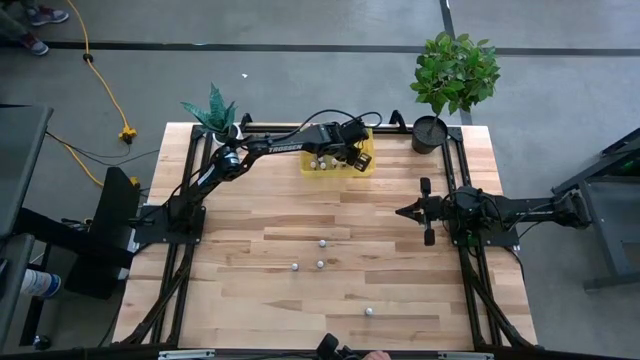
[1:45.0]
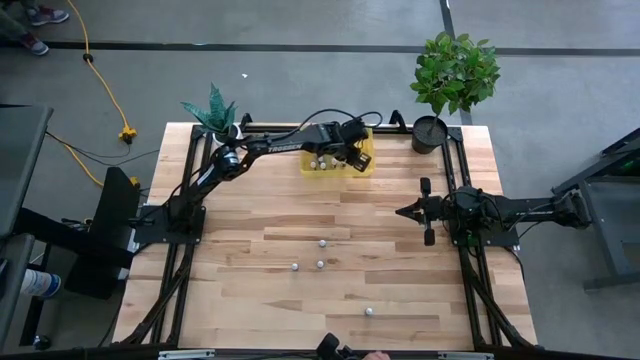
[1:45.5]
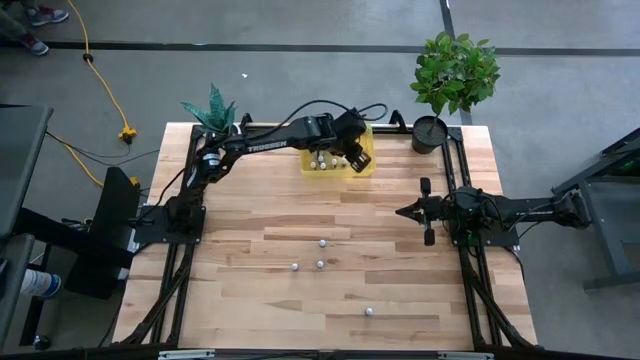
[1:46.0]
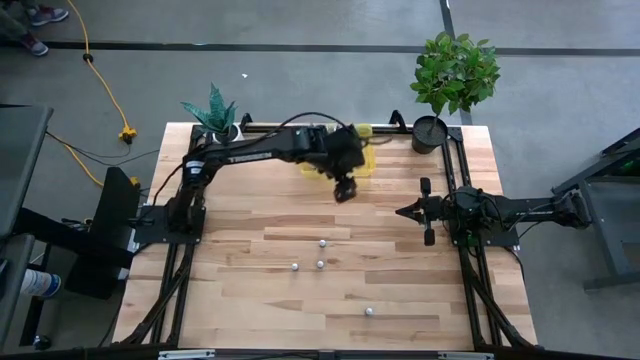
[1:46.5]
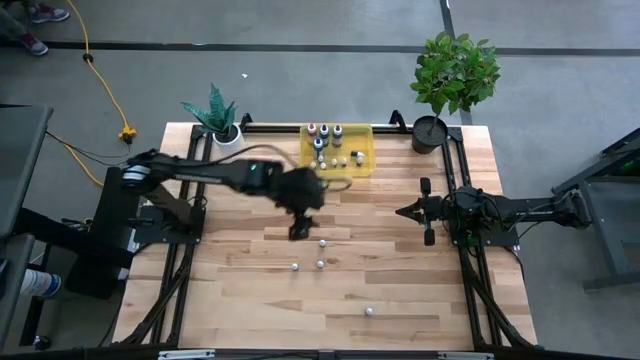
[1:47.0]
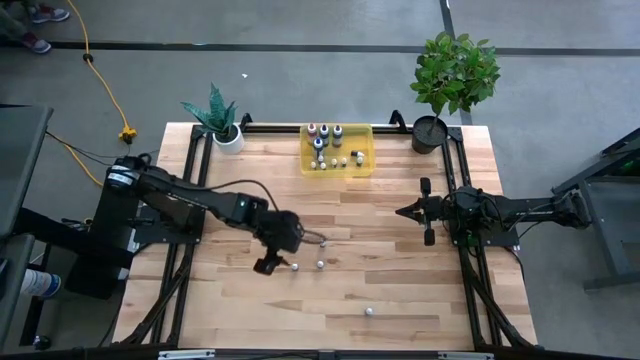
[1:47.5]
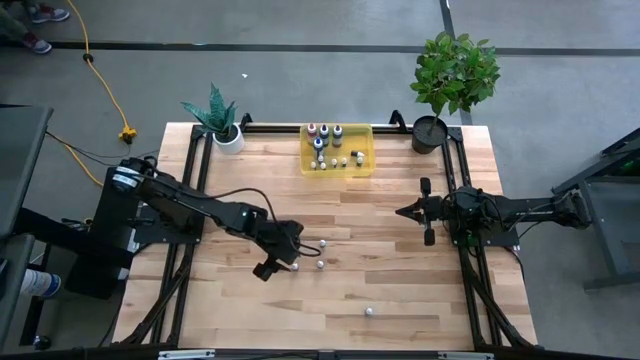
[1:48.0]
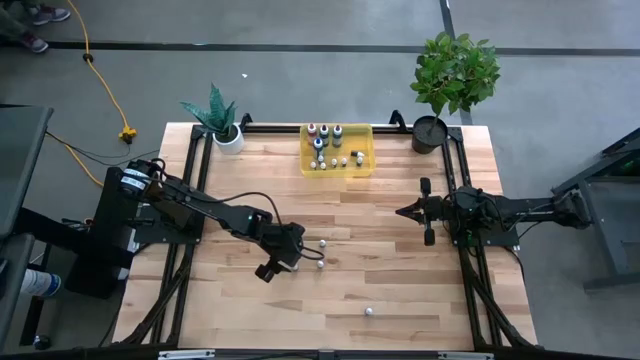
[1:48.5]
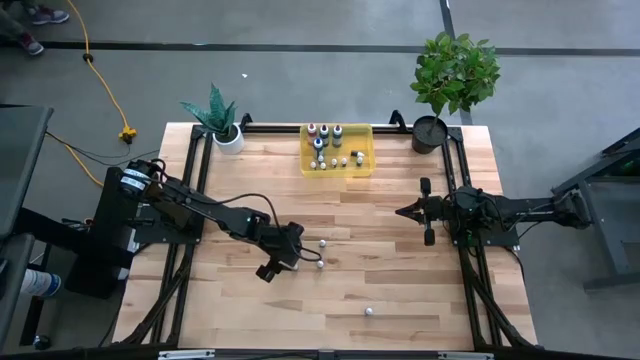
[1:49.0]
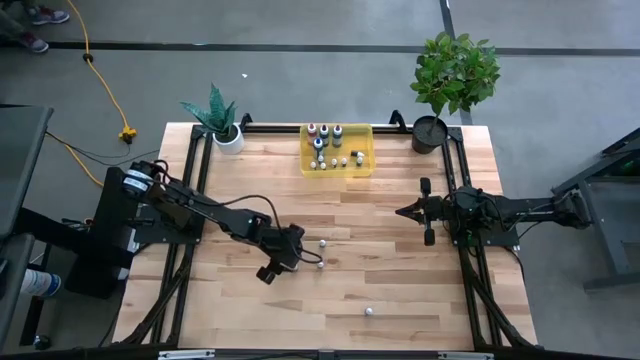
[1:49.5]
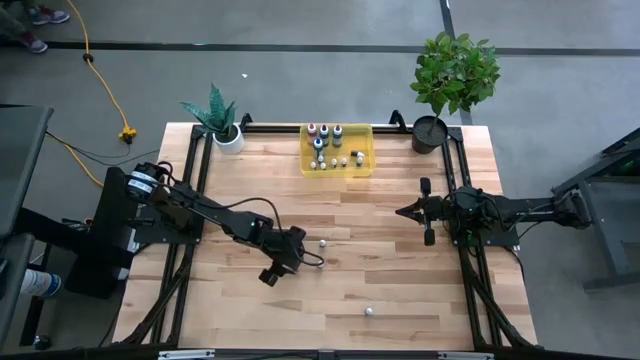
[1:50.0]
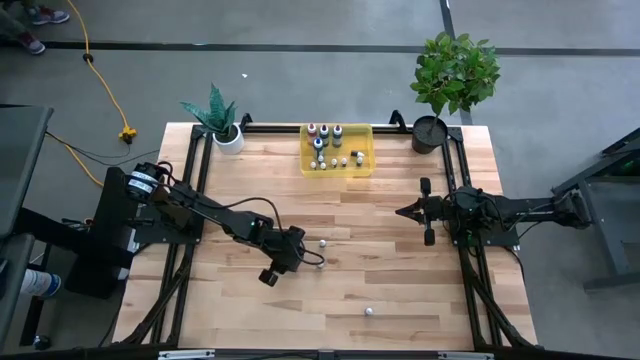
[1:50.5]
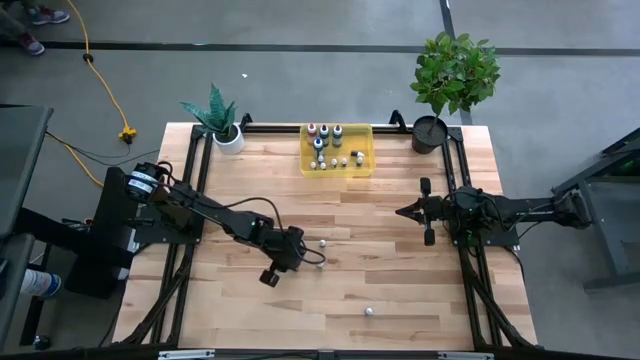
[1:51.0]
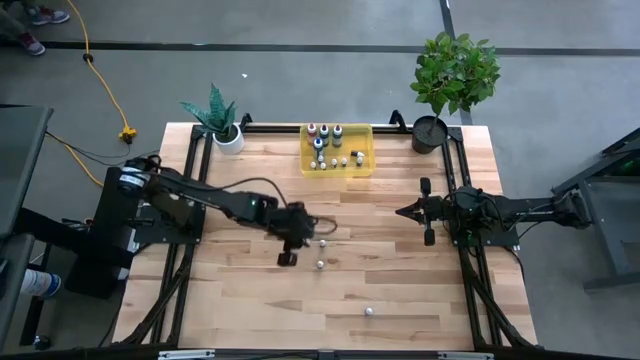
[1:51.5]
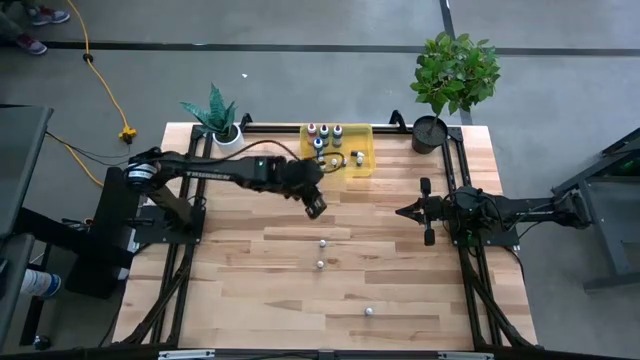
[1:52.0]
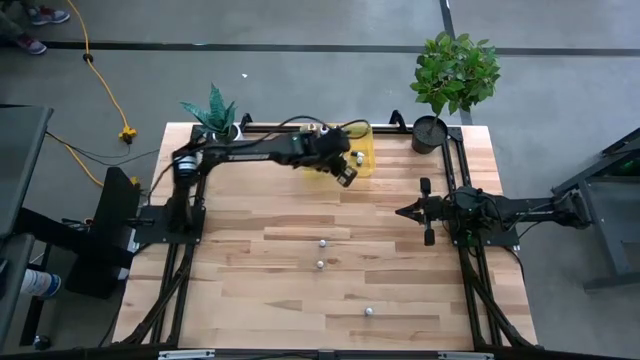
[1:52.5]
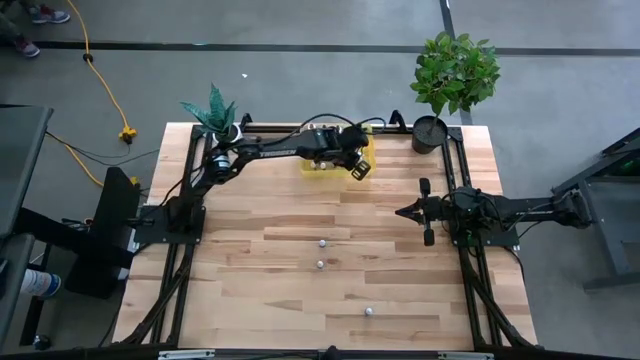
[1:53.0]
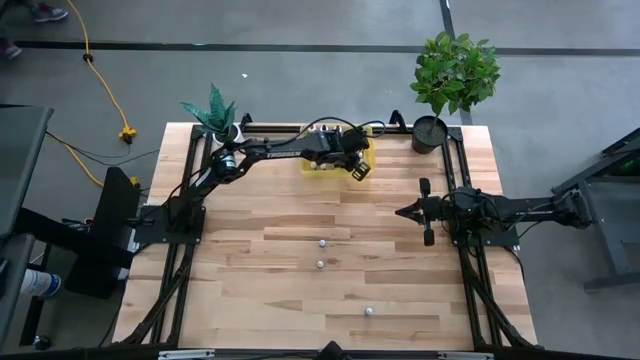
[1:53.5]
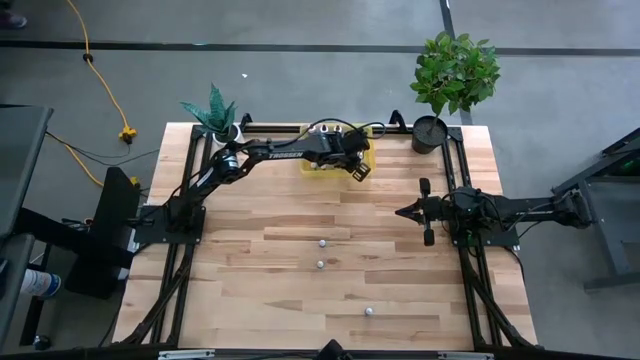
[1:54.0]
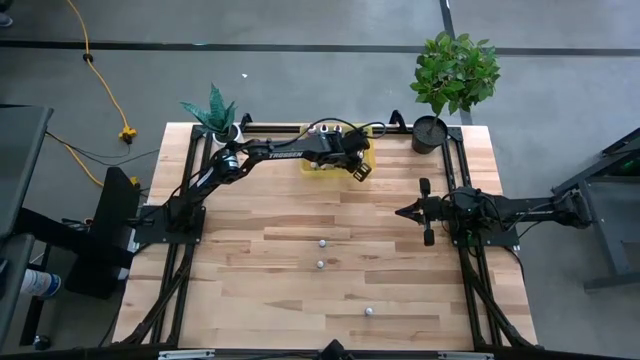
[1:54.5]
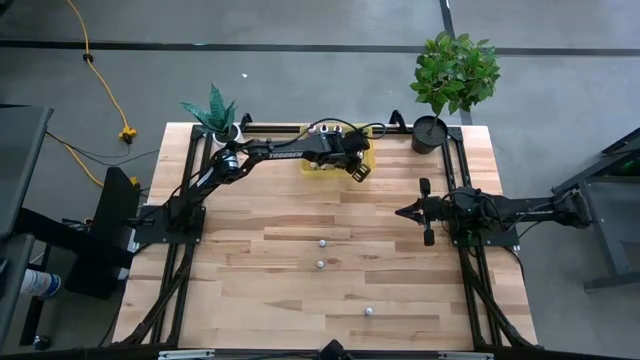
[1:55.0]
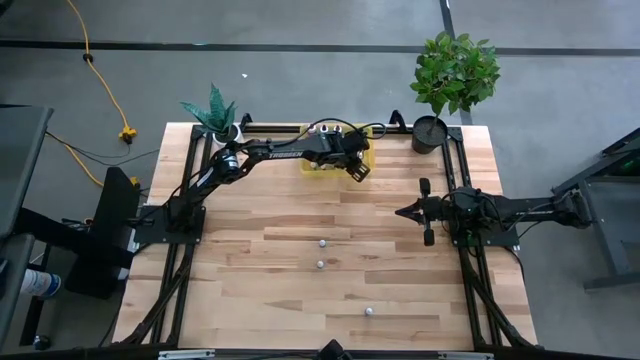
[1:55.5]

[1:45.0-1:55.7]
Task: Pick & Place food coloring
Put the small red food coloring bottle into the yellow bin

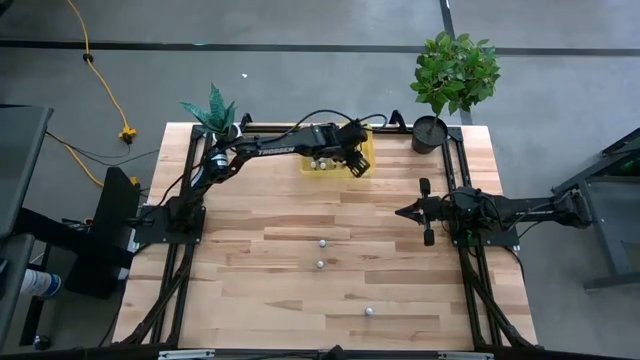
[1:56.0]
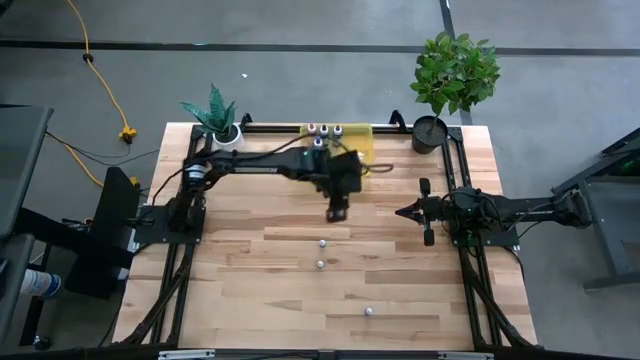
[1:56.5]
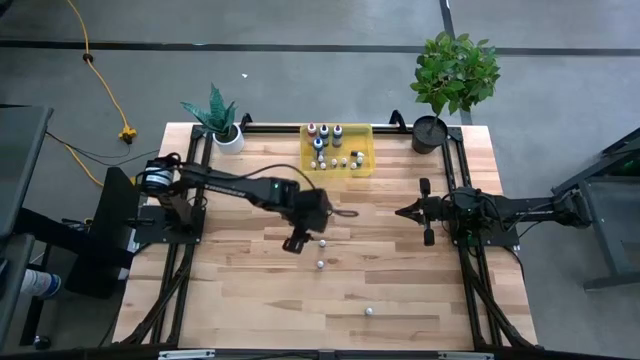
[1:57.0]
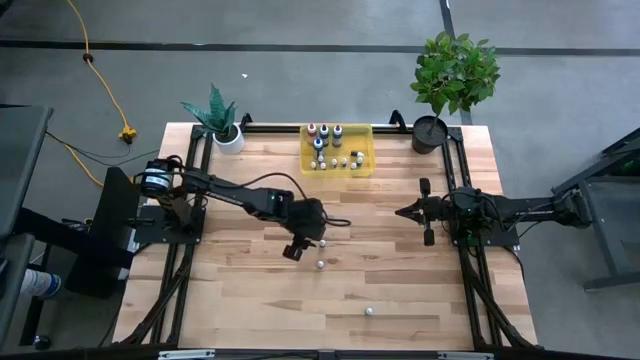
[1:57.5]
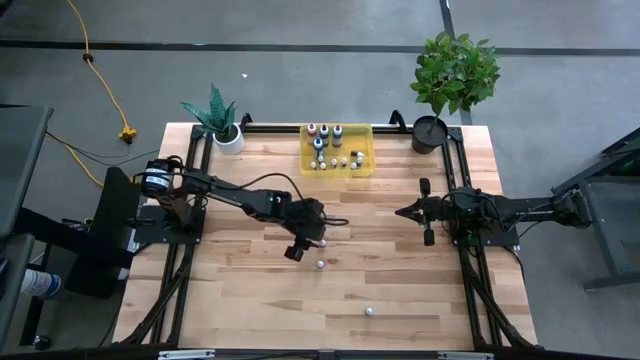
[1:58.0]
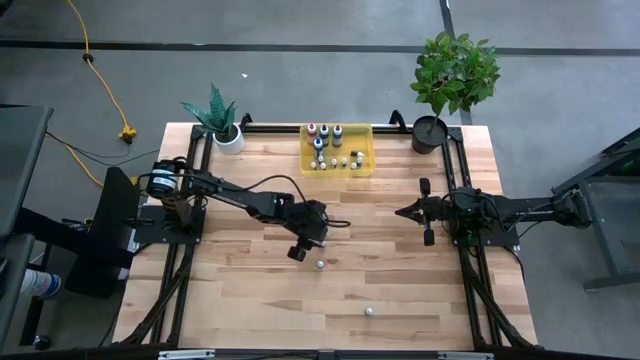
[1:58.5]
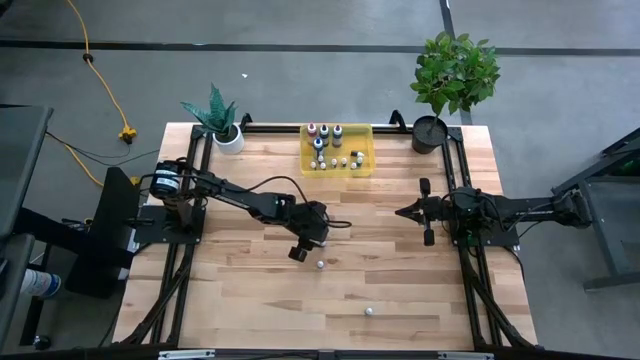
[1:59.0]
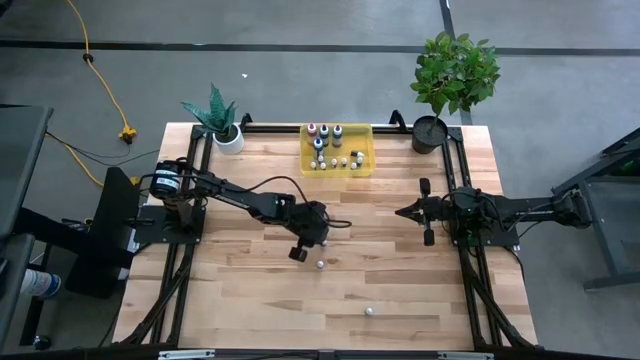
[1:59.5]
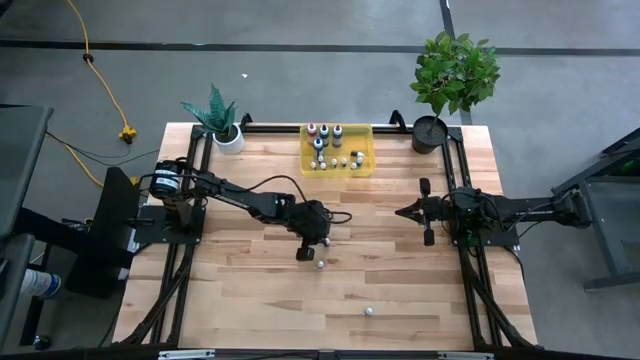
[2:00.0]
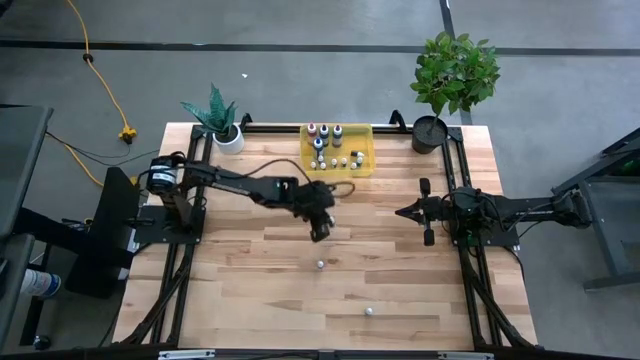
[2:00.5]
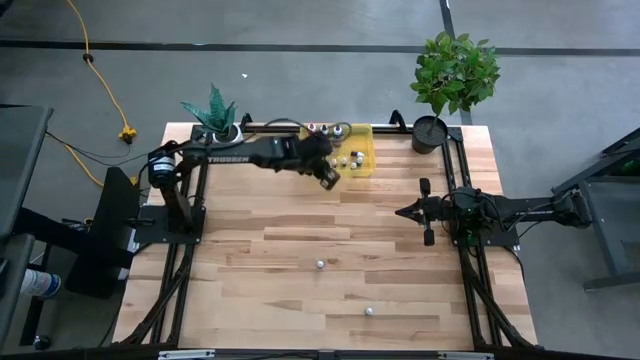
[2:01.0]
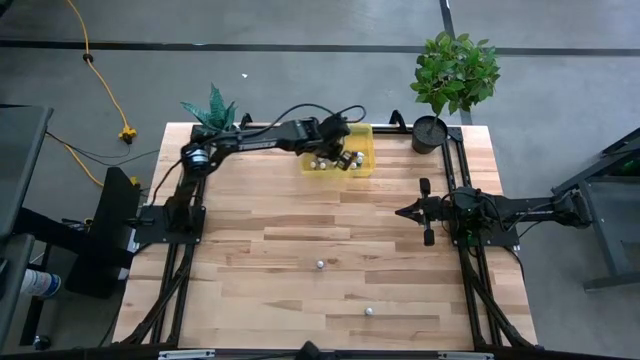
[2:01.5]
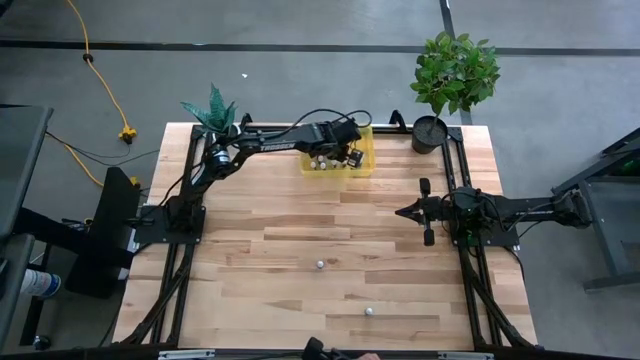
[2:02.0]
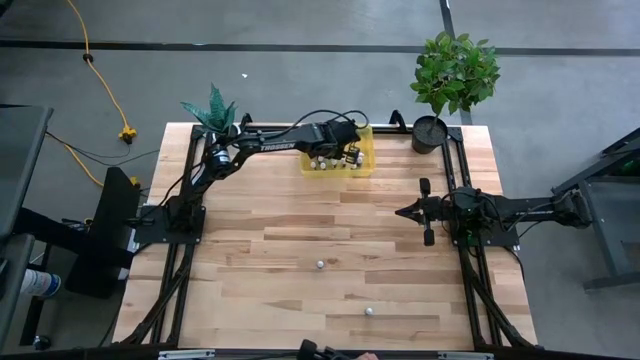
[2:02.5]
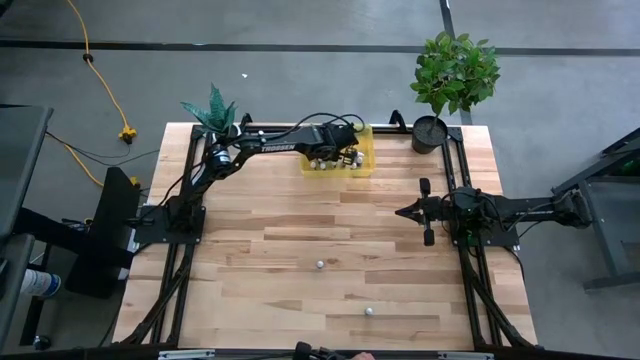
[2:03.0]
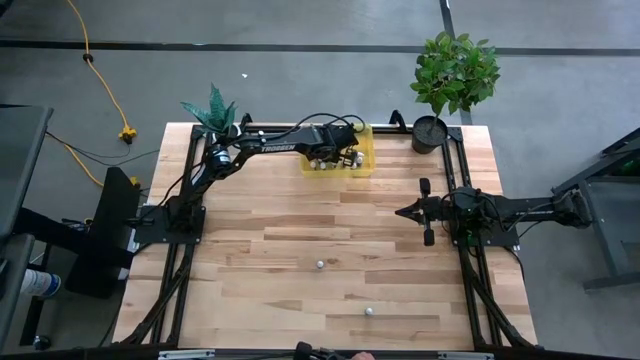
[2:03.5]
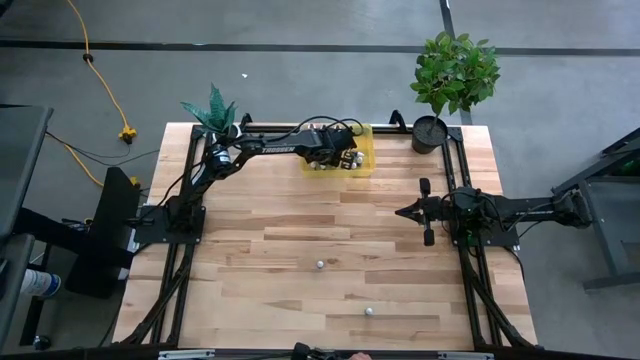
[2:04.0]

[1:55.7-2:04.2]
Put the small green food coloring bottle into the yellow bin

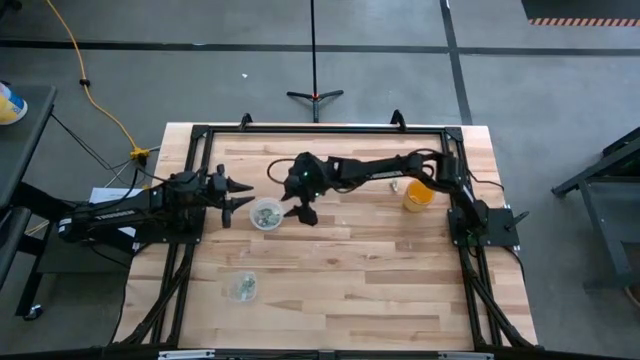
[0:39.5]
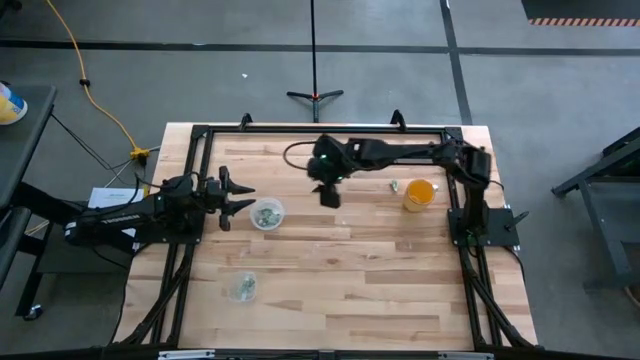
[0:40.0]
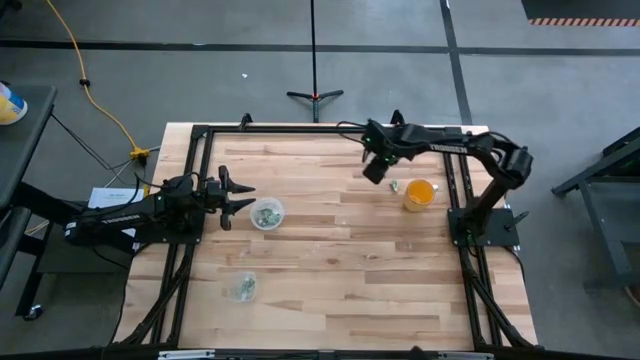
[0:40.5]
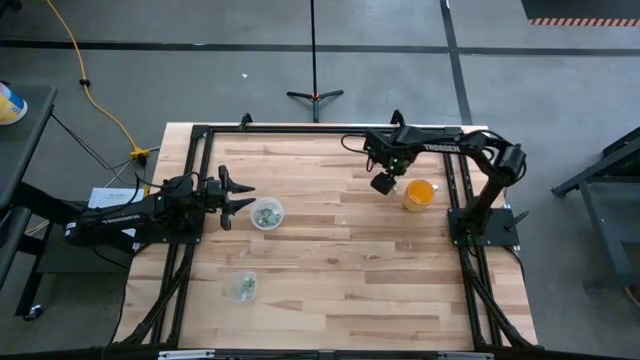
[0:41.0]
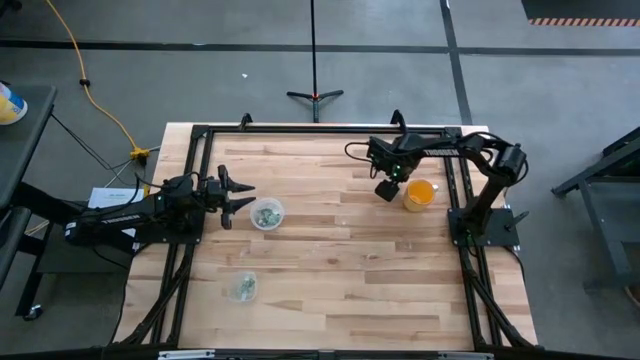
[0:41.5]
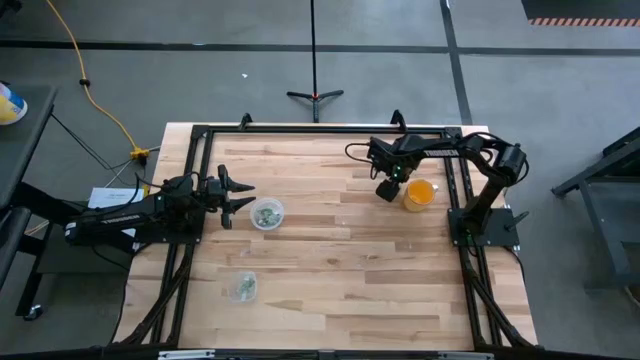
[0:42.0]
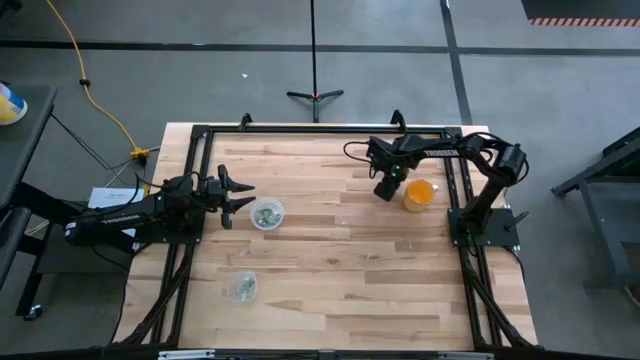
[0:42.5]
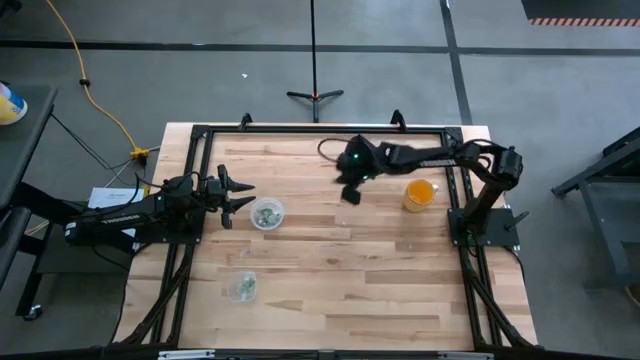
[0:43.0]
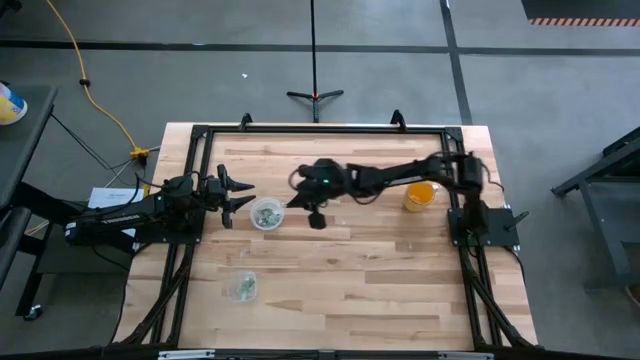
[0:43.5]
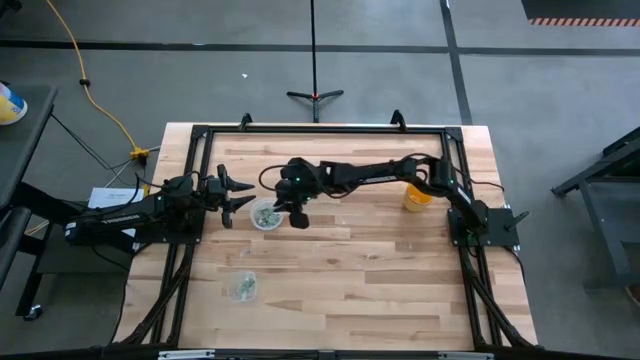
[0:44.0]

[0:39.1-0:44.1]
Task: Pick and place Stevia / Truvia into bins
Put the stevia packet in the top transparent container
